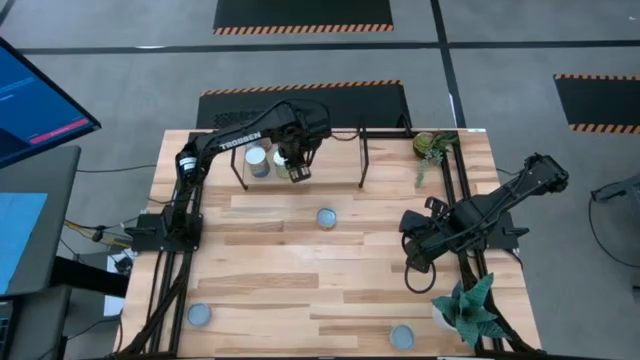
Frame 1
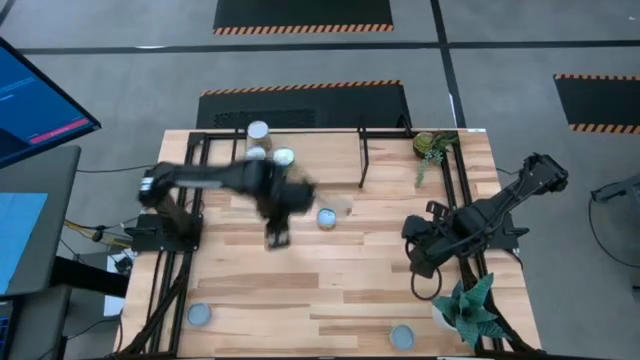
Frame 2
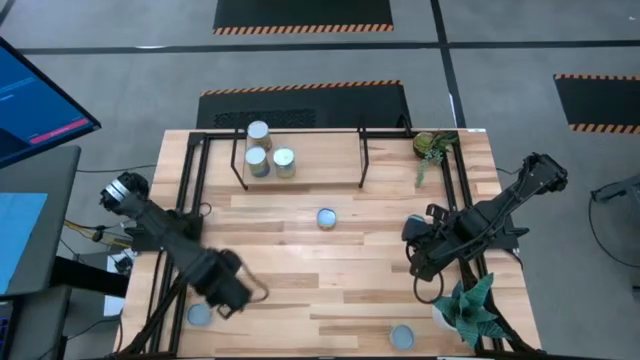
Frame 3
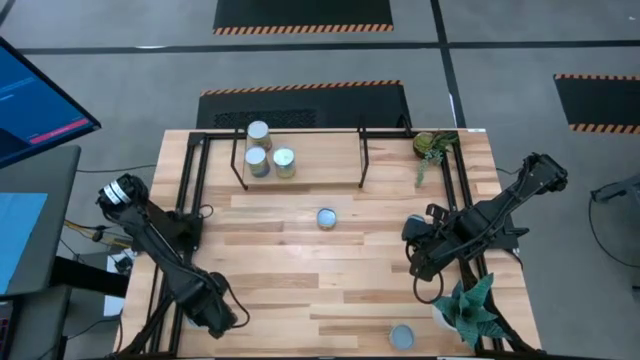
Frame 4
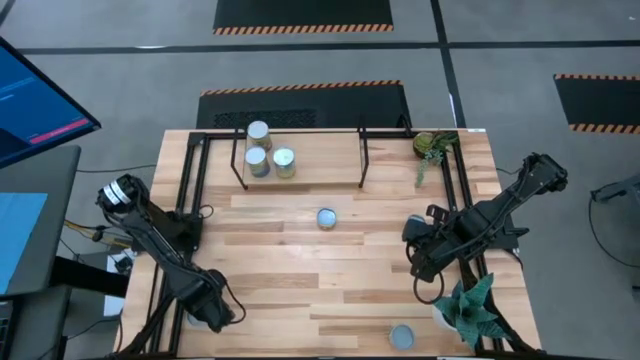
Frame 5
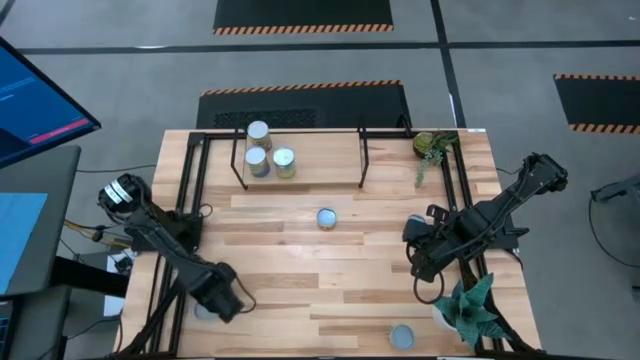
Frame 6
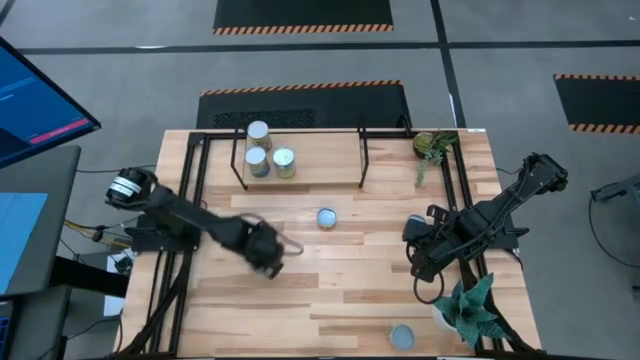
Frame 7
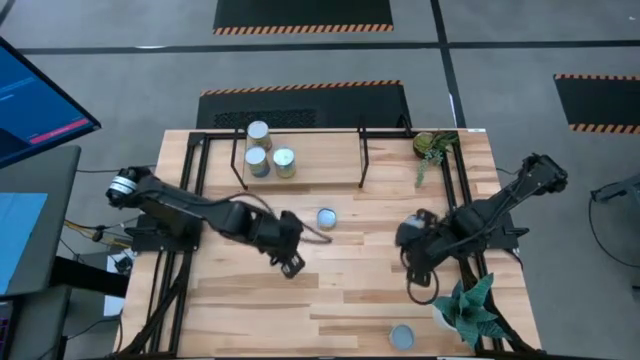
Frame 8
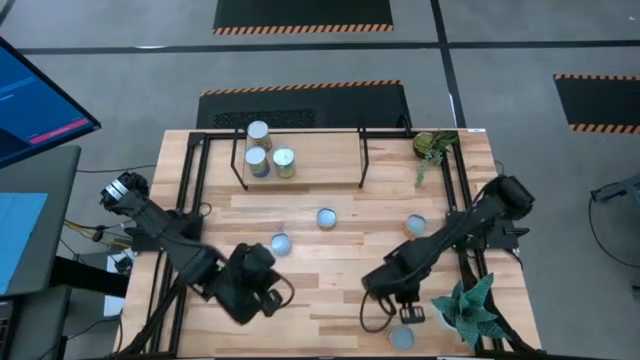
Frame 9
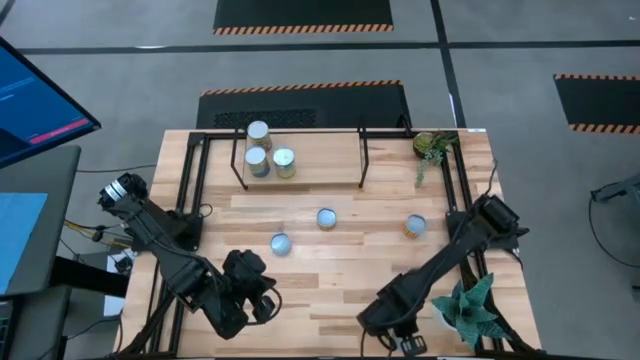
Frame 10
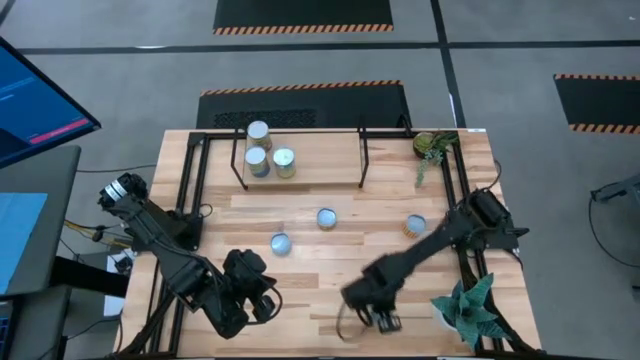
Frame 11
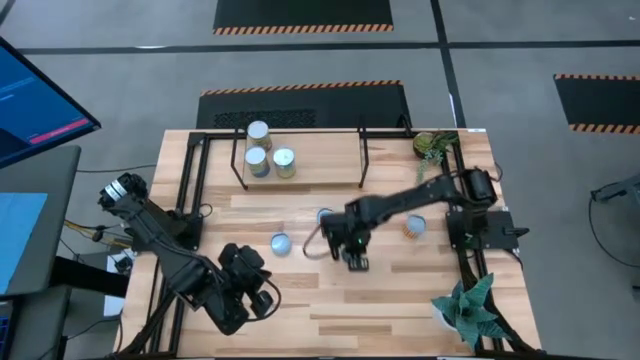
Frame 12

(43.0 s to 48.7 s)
Task: Pick and place cans onto a shelf
Move the cans to the middle of the table

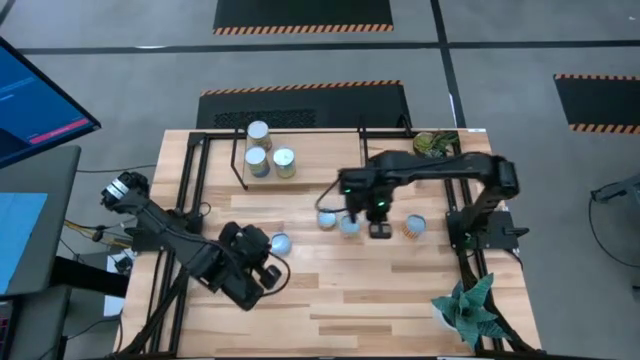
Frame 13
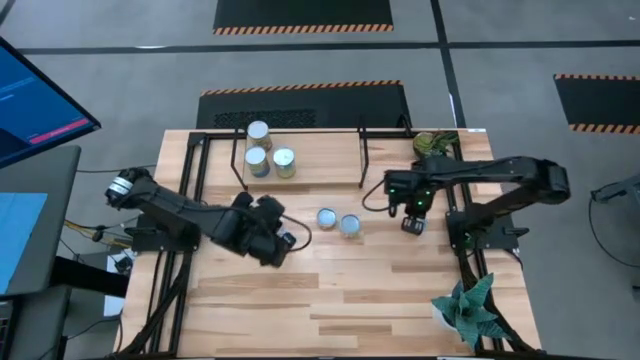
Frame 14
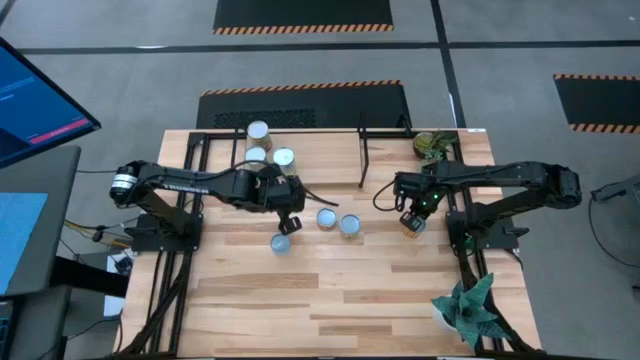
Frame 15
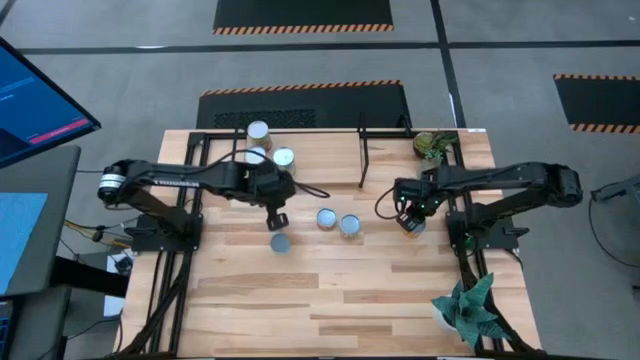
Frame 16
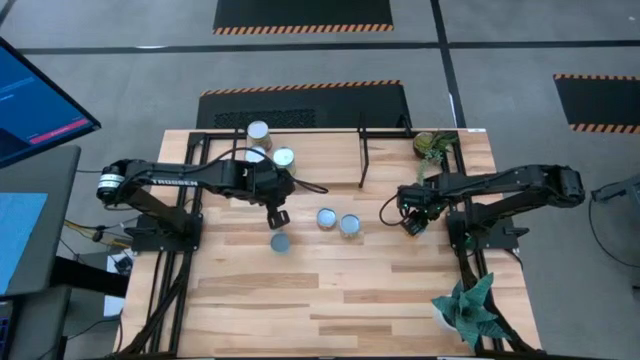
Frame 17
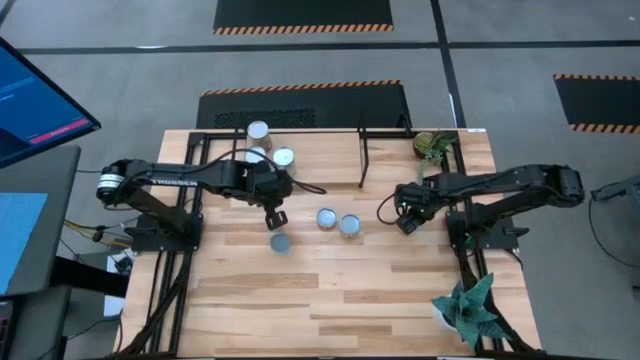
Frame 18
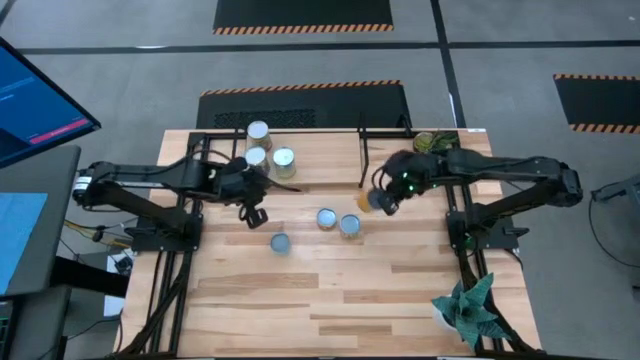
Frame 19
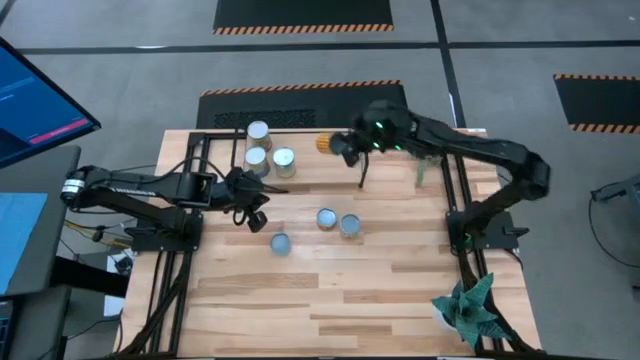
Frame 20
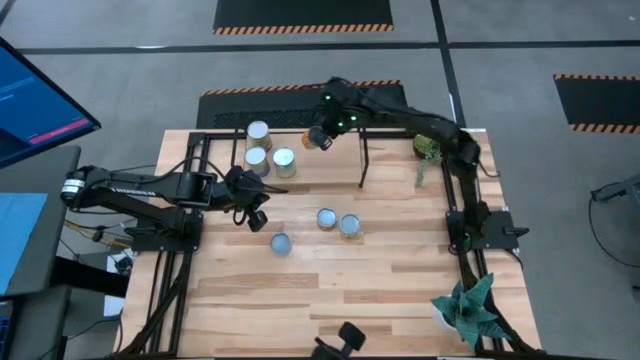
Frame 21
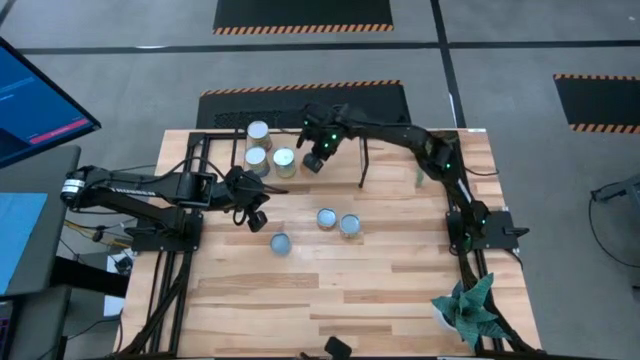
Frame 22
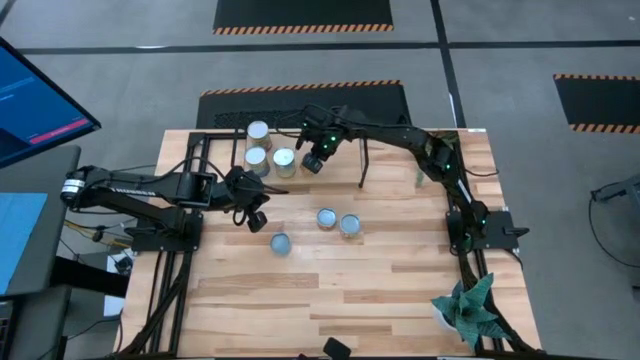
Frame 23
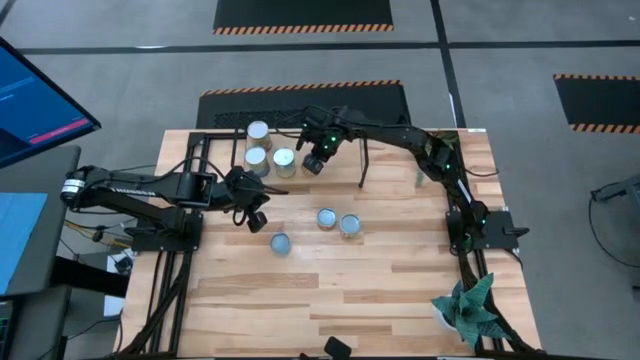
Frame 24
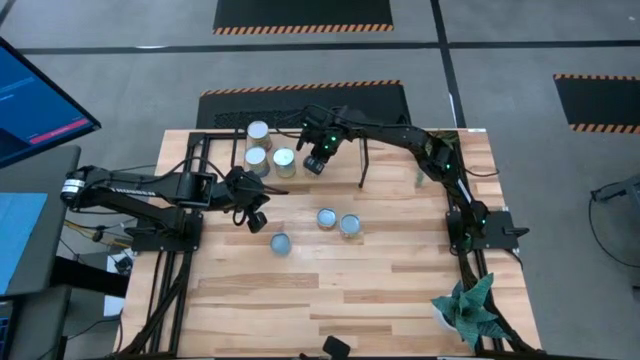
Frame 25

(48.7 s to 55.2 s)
Put the canned spice on the shelf

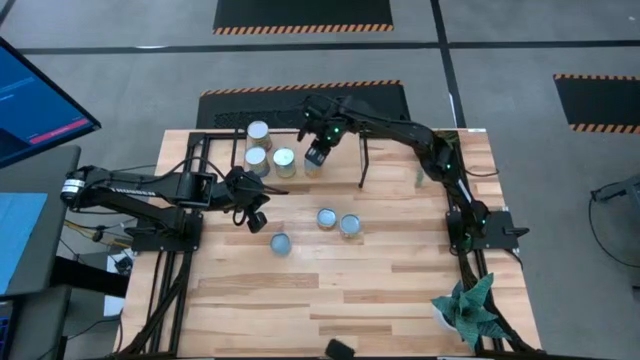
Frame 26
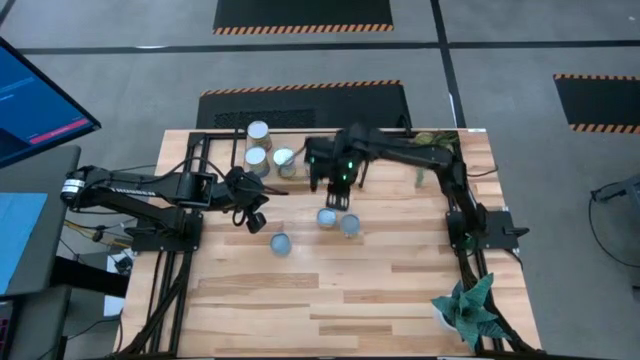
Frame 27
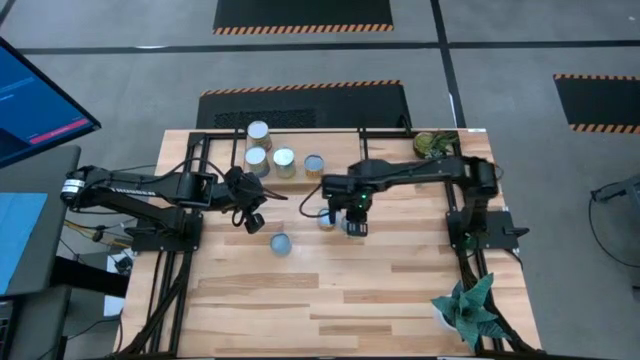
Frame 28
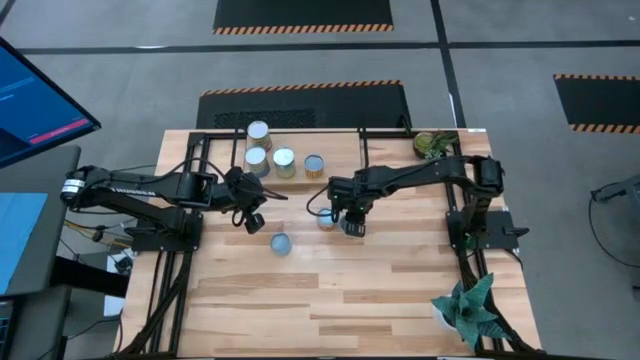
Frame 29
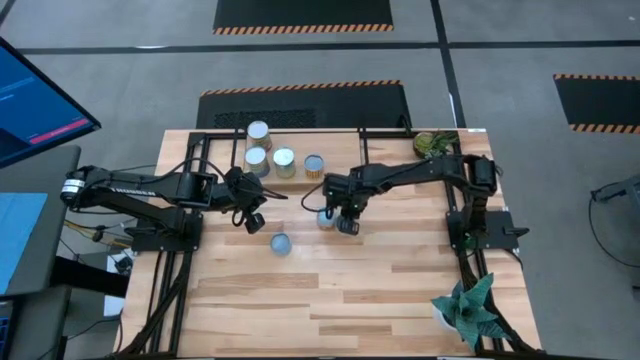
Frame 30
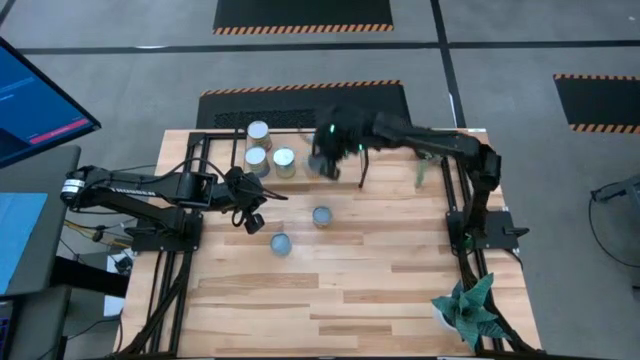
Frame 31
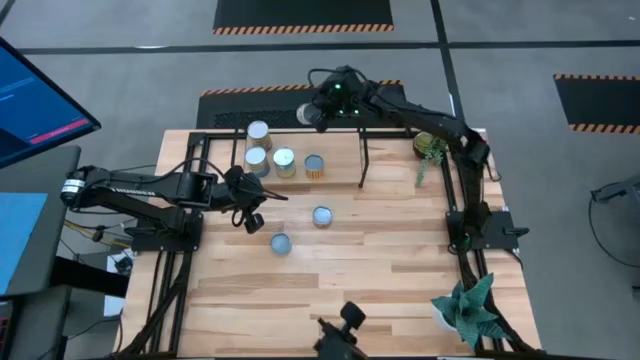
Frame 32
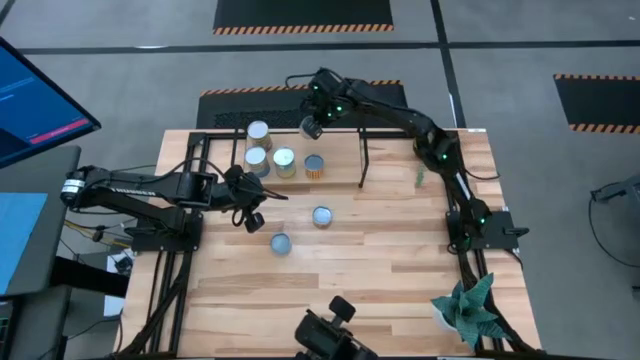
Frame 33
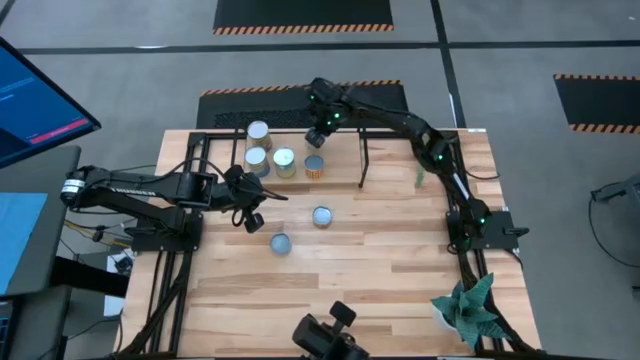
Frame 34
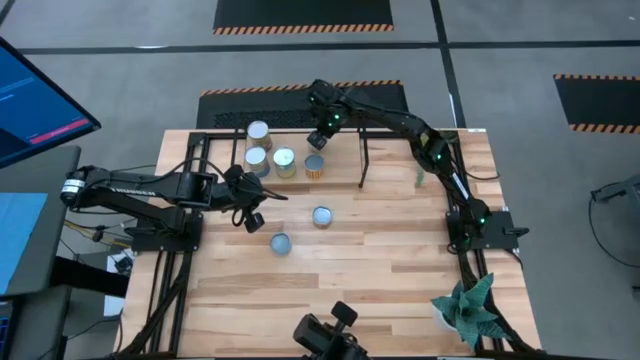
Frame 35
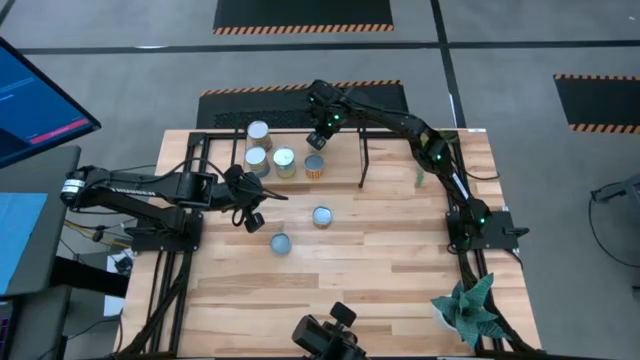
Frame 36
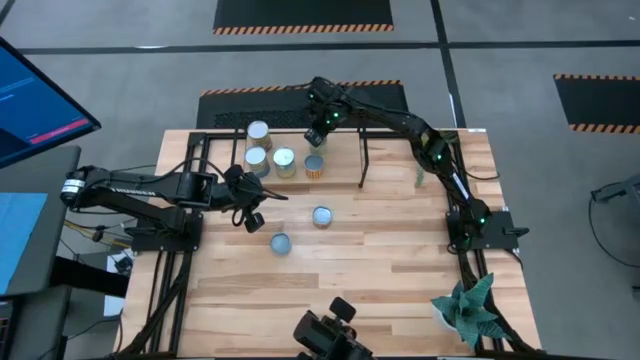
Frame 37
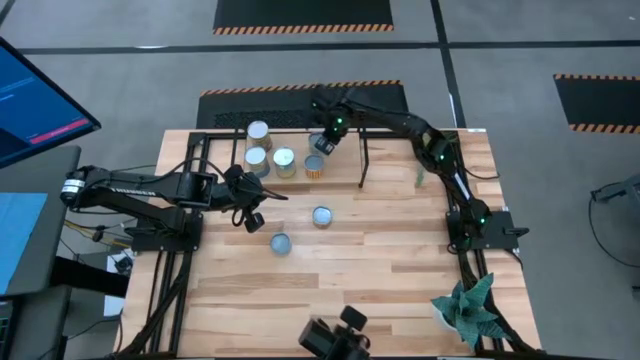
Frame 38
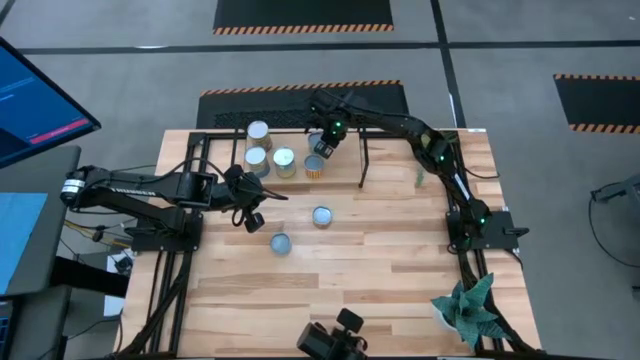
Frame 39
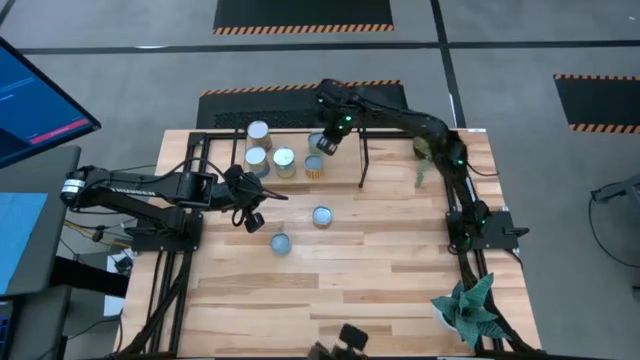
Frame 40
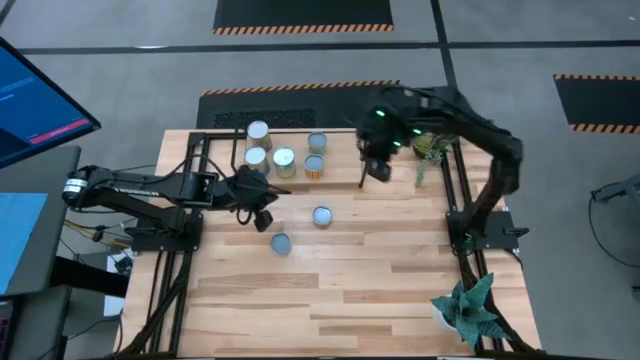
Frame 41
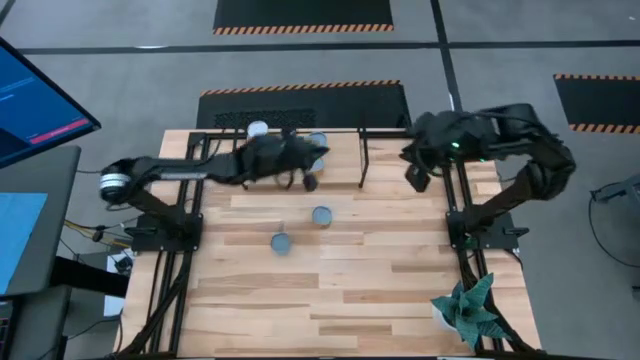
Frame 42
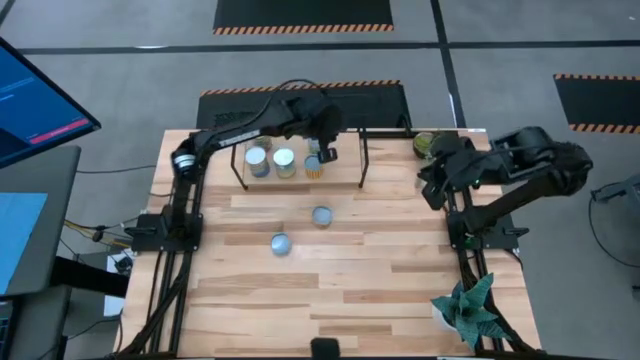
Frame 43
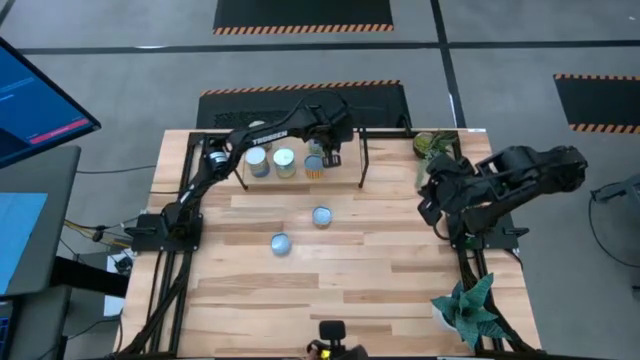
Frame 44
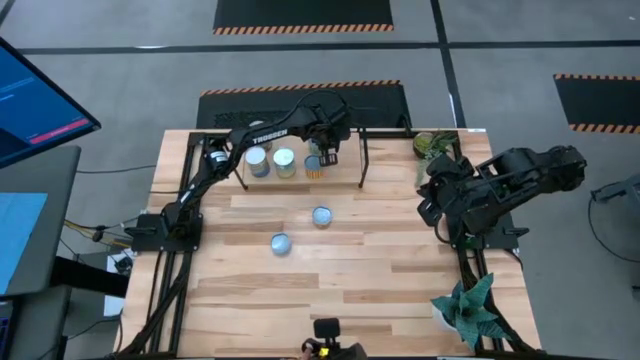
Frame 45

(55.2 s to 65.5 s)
Put the canned peas on the shelf
